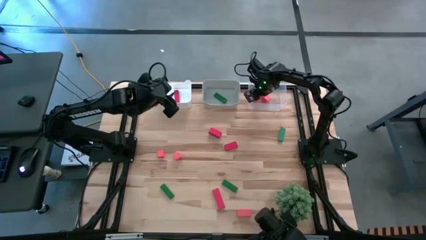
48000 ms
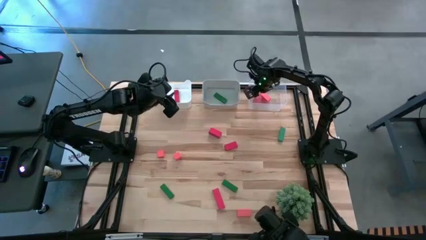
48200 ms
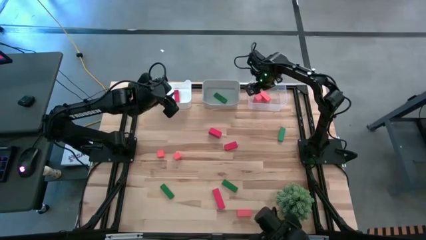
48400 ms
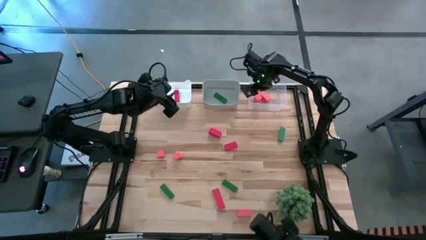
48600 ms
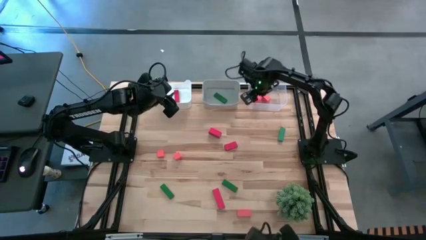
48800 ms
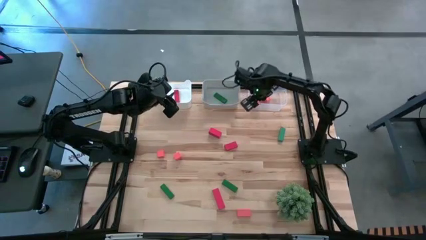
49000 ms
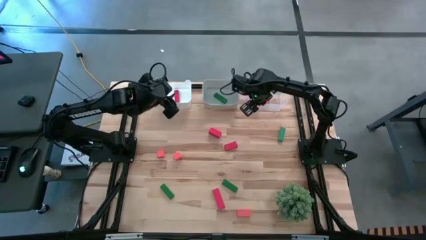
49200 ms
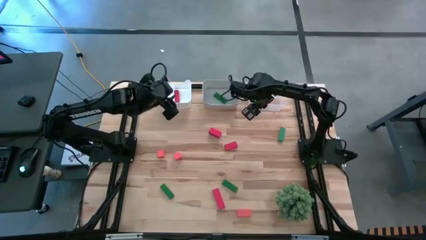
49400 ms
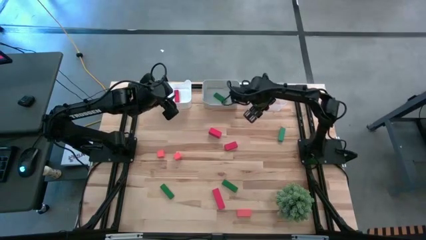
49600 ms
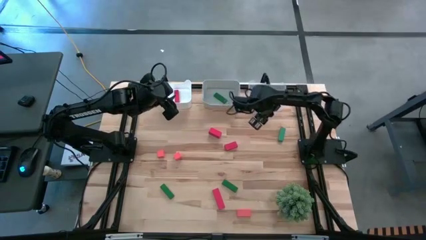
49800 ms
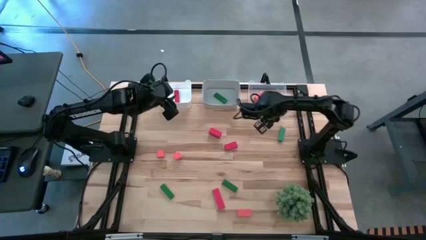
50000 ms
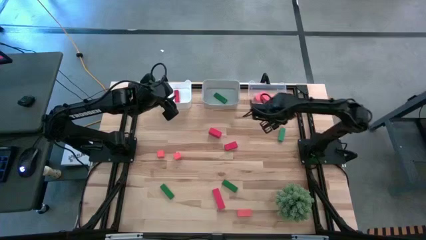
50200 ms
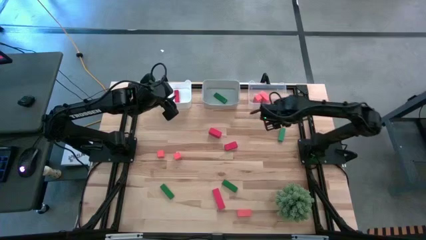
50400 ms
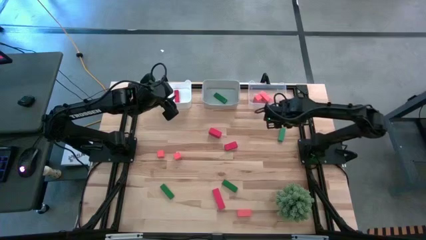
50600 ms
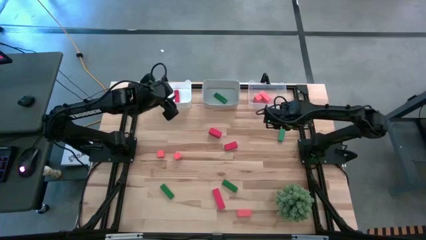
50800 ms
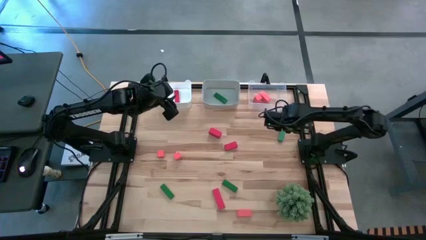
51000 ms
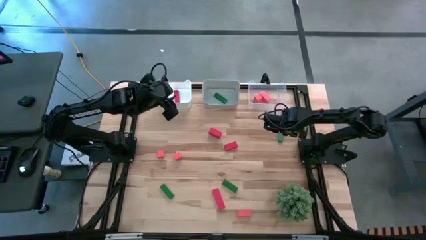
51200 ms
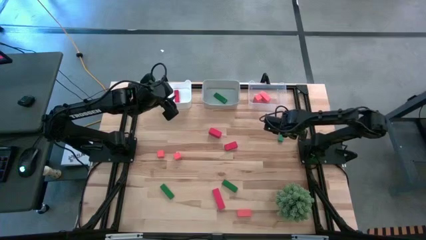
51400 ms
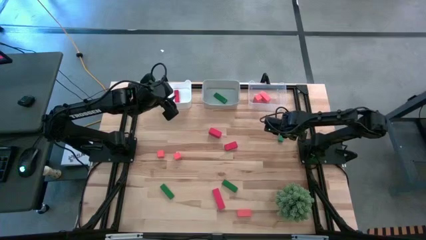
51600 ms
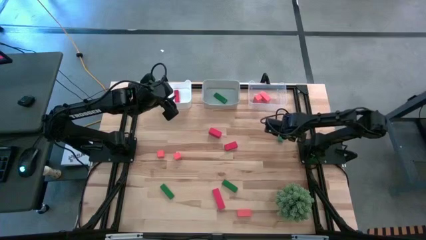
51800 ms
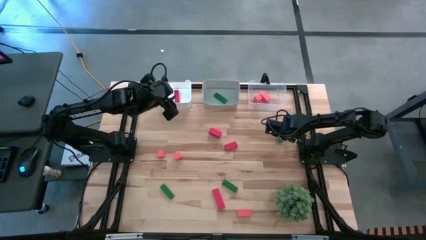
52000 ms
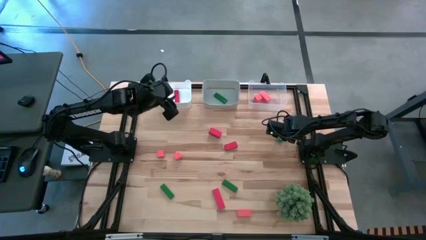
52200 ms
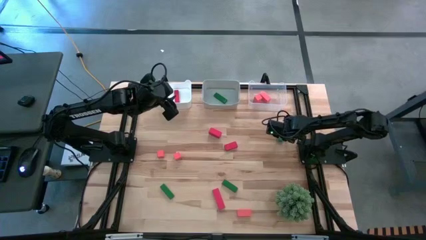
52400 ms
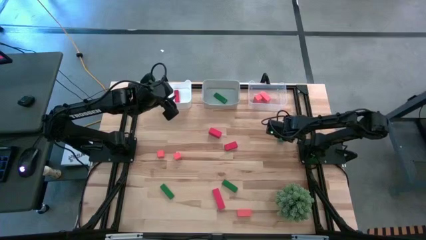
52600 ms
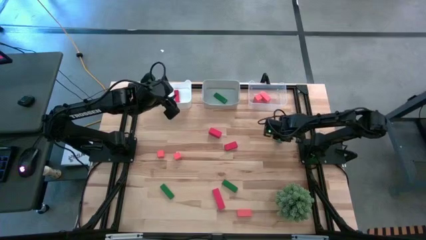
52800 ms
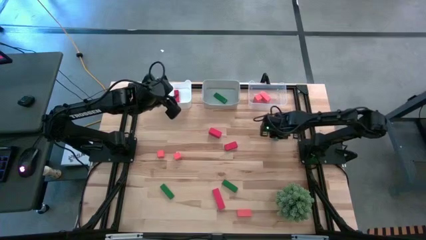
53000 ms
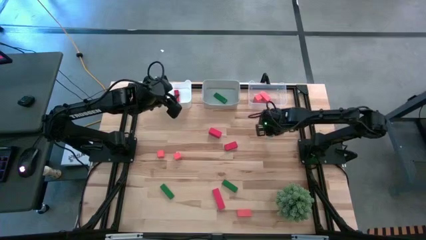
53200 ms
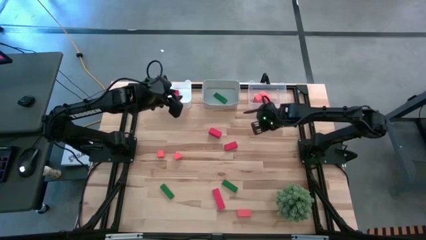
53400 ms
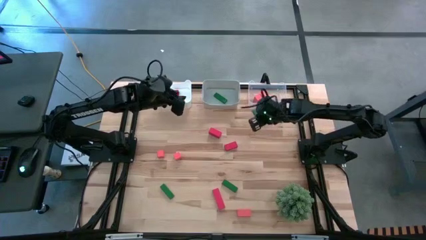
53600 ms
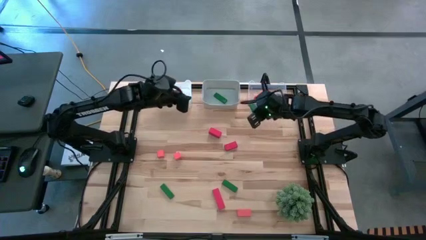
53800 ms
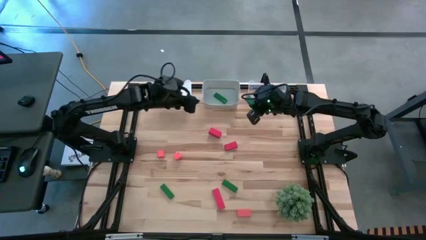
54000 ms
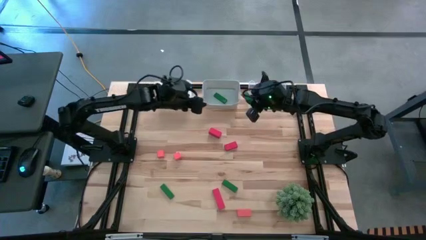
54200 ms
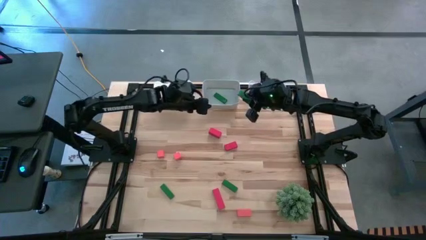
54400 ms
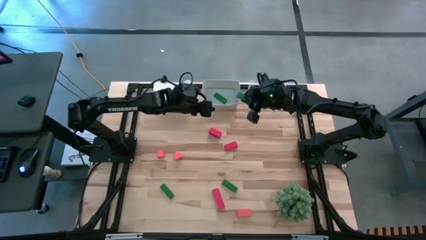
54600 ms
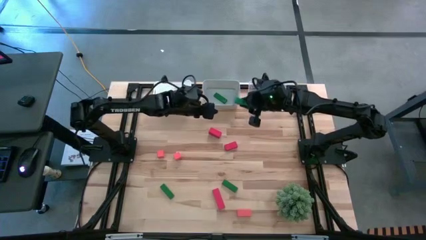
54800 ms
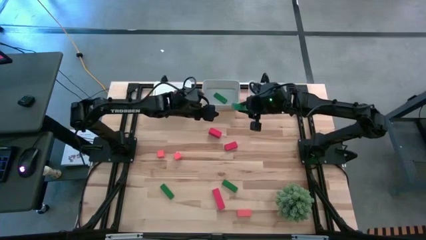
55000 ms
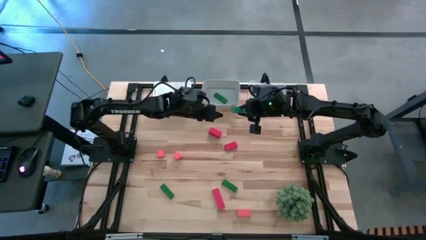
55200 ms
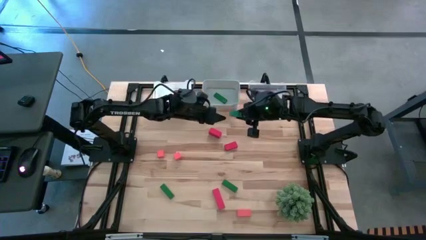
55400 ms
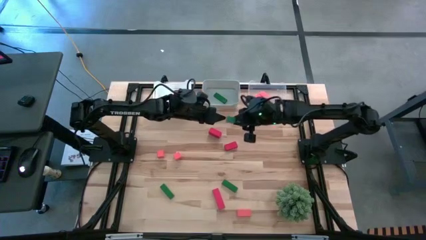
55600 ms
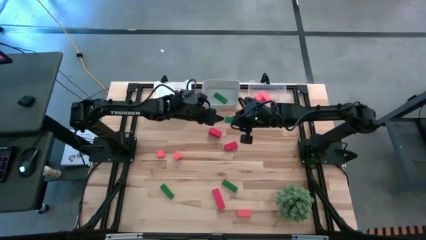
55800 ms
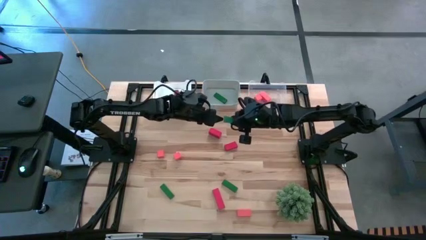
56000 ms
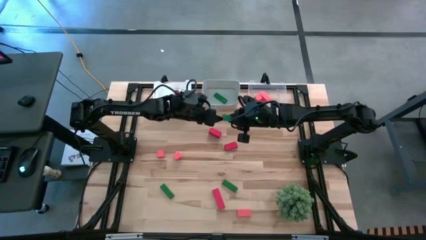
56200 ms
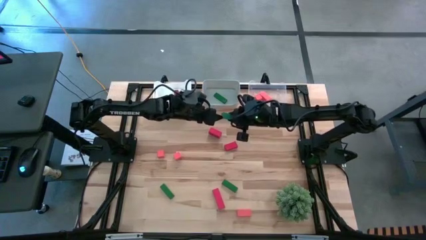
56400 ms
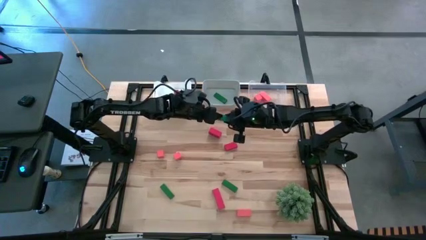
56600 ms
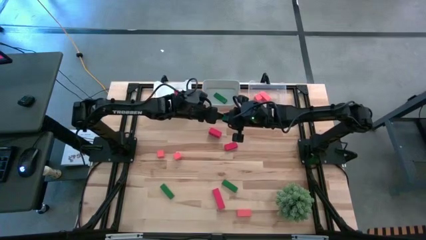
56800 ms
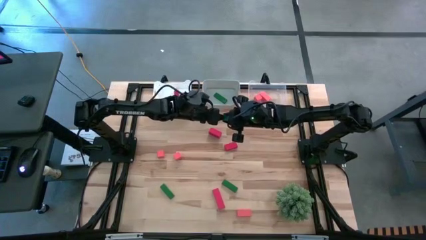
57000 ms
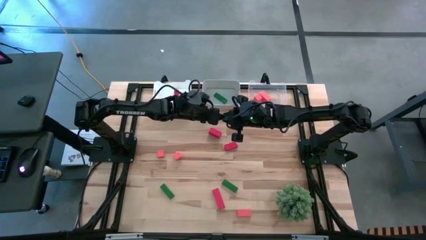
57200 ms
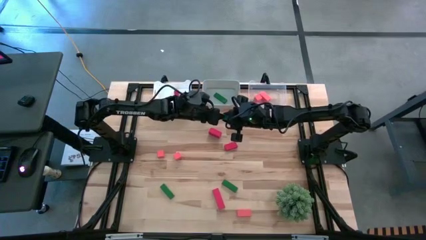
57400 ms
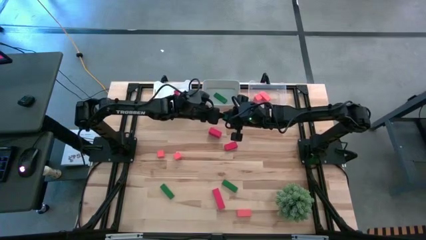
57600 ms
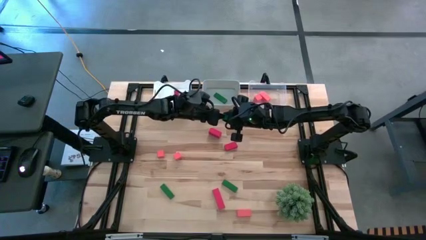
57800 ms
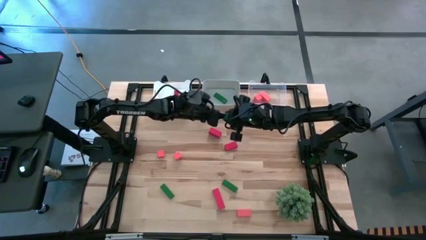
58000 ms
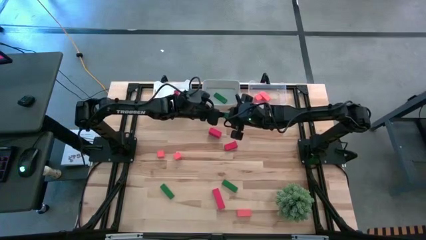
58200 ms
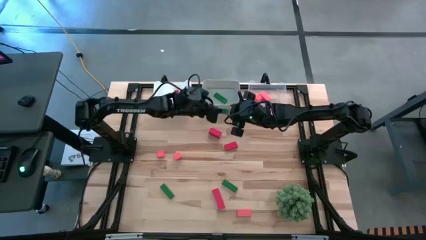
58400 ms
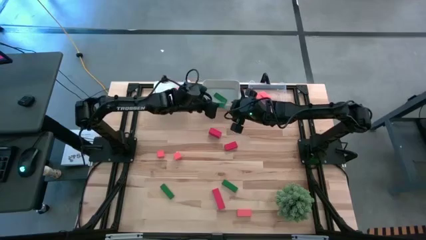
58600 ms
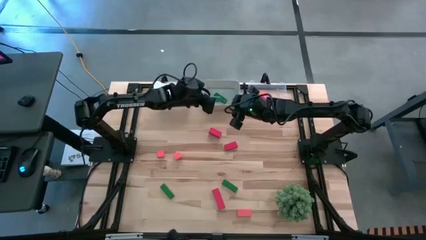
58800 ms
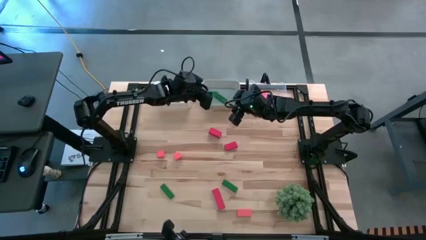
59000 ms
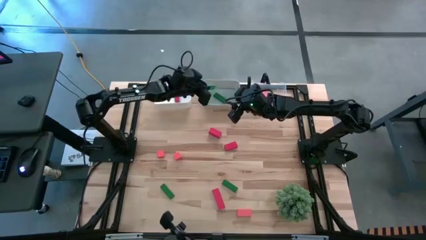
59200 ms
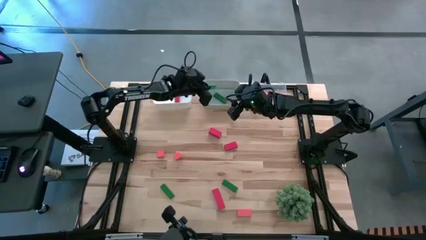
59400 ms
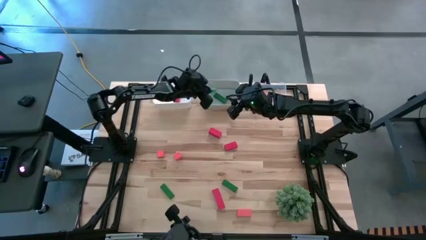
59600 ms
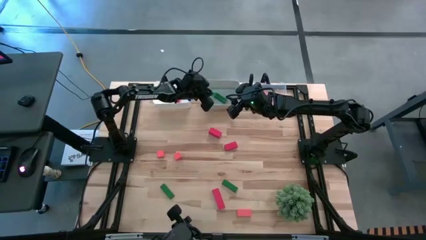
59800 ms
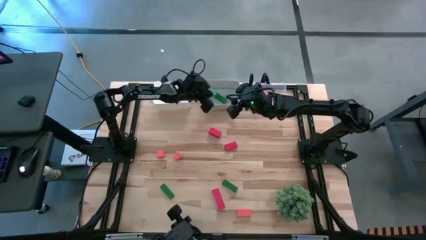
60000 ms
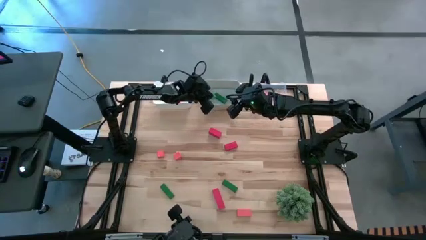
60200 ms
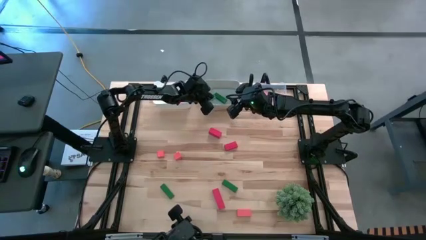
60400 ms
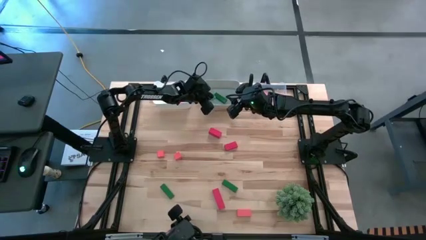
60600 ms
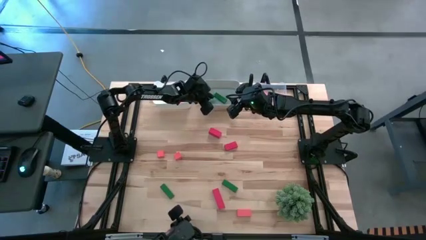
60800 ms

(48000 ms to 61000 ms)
Task: Sort & place blocks by color
Put the top green block into the grey bin

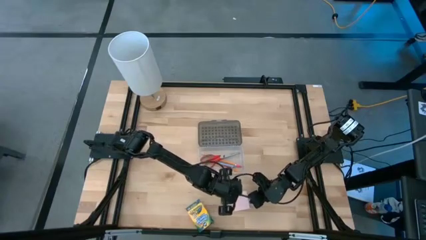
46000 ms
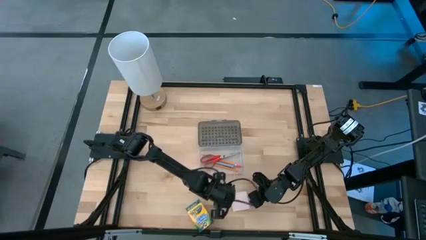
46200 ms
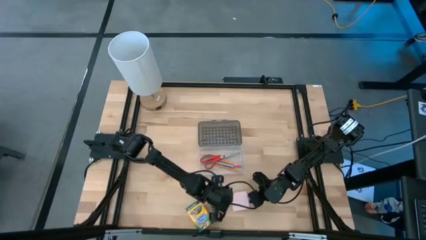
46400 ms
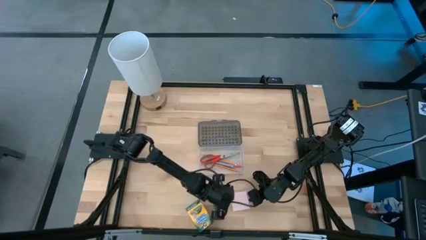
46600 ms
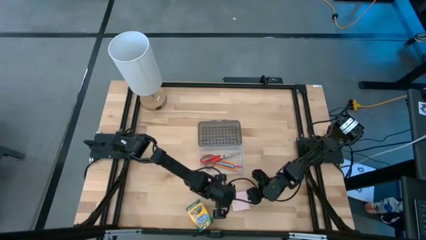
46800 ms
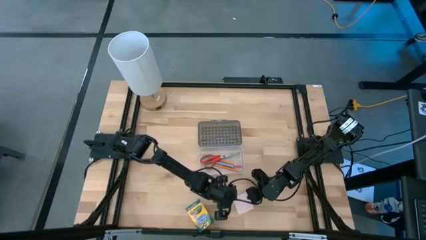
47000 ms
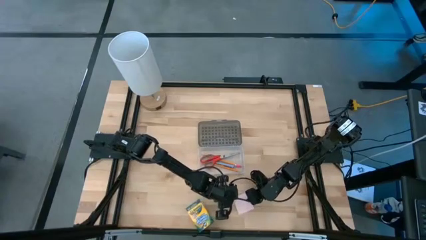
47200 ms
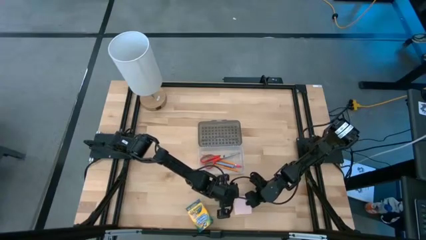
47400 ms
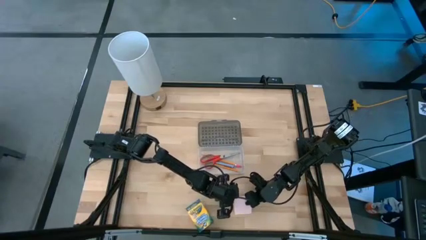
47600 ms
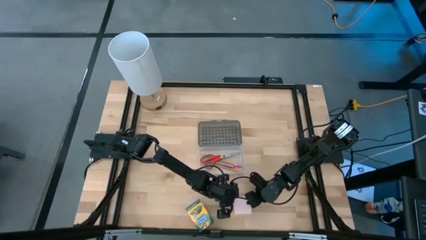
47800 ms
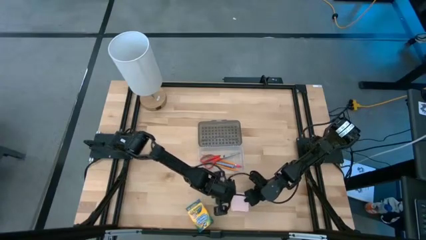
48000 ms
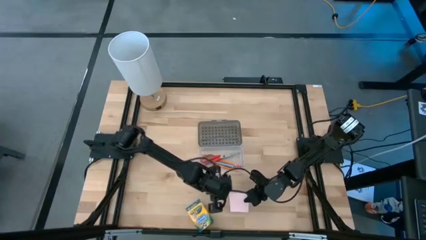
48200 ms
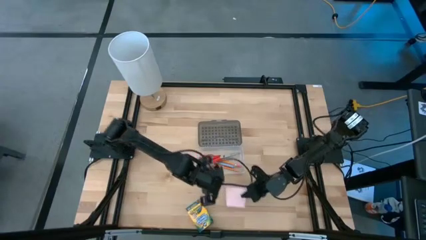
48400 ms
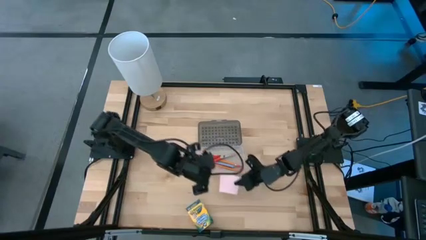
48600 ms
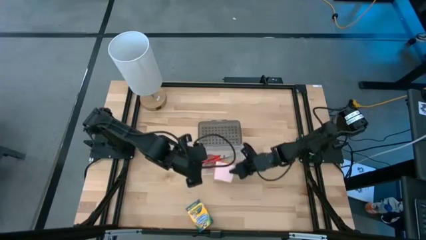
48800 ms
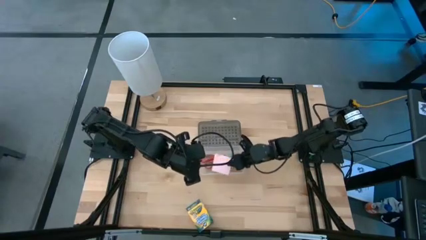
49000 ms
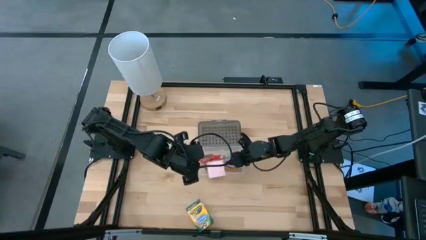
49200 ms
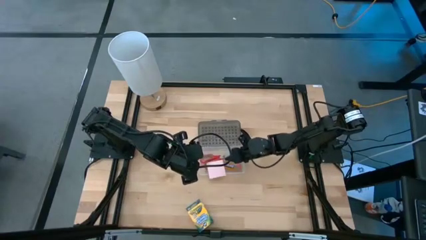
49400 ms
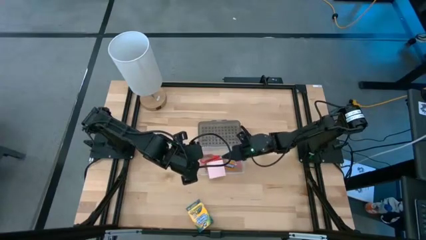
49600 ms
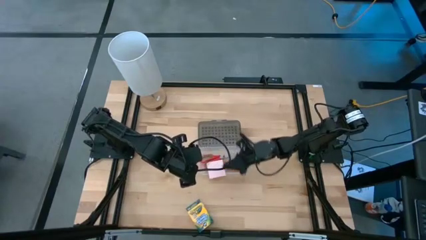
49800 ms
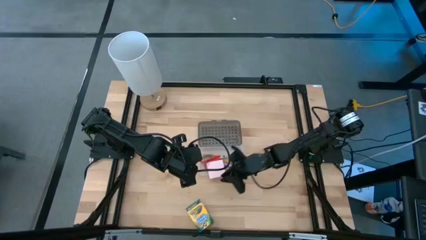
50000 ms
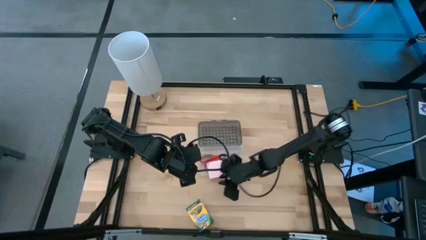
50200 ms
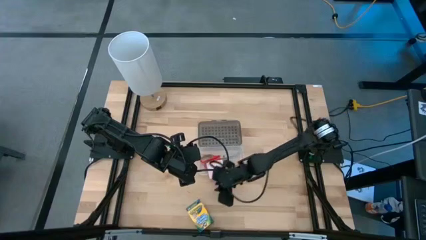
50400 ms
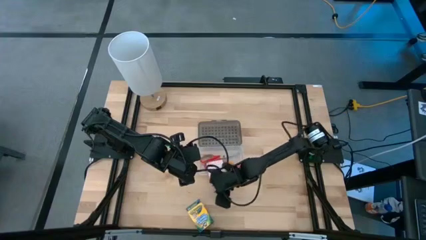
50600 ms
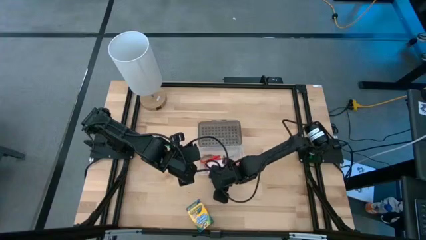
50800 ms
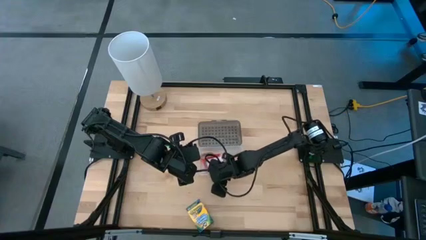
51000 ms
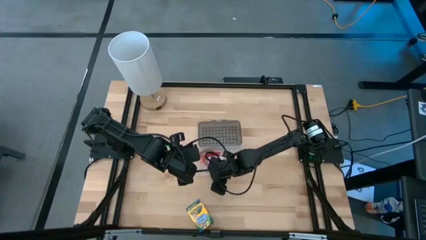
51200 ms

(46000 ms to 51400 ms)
Task: Pack school essentials
Put the light pink sticky notes into the transparent supply box
